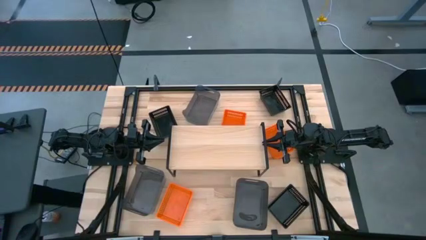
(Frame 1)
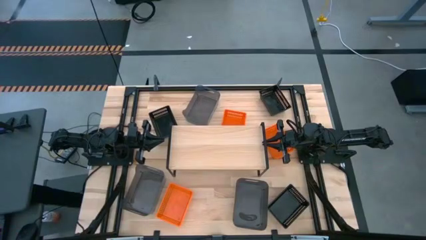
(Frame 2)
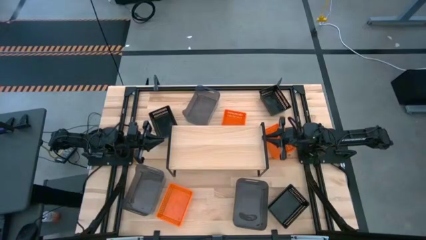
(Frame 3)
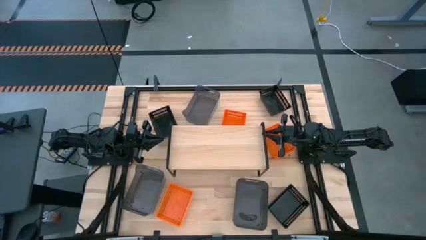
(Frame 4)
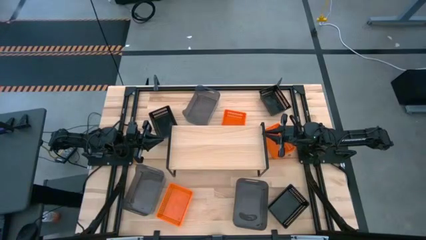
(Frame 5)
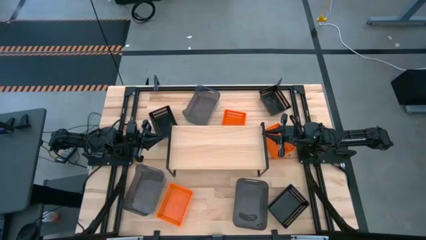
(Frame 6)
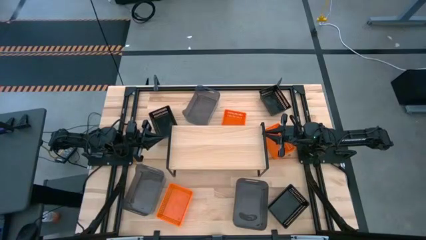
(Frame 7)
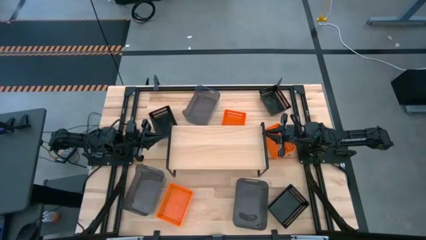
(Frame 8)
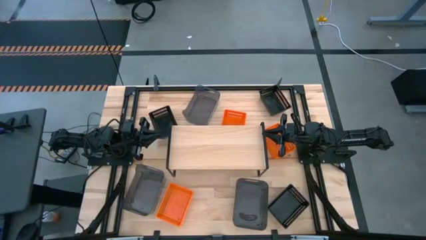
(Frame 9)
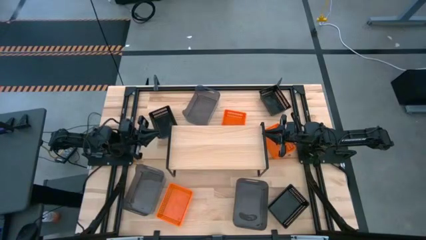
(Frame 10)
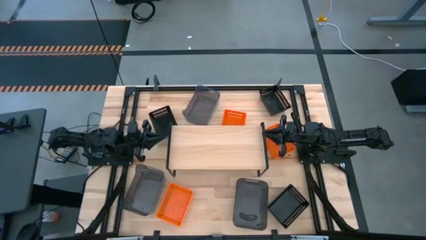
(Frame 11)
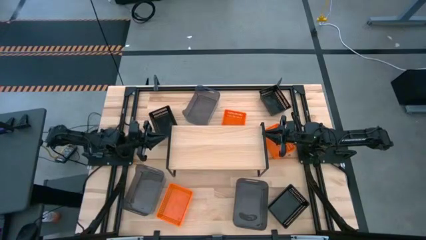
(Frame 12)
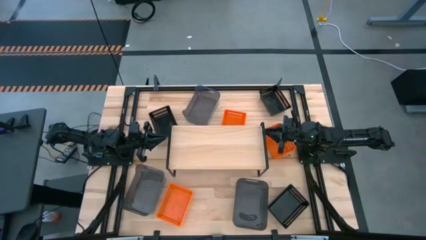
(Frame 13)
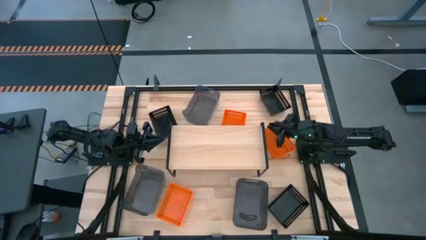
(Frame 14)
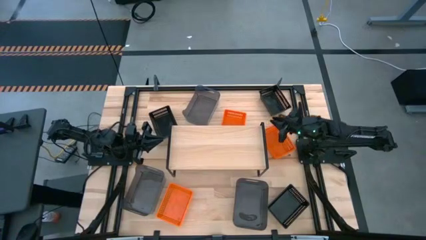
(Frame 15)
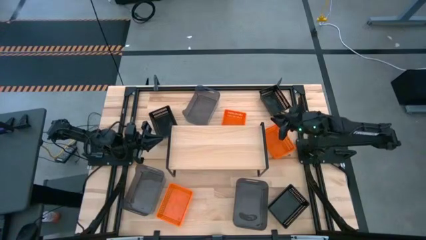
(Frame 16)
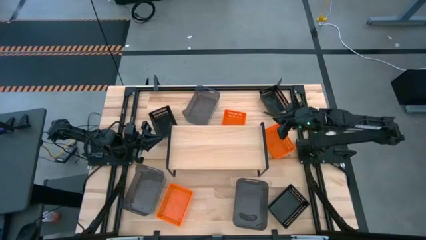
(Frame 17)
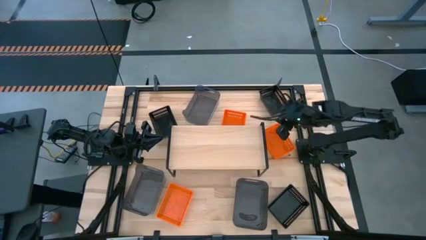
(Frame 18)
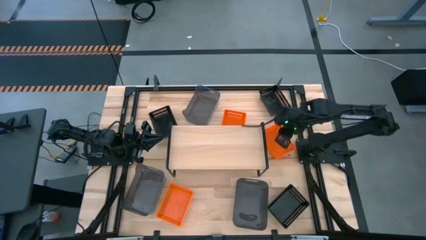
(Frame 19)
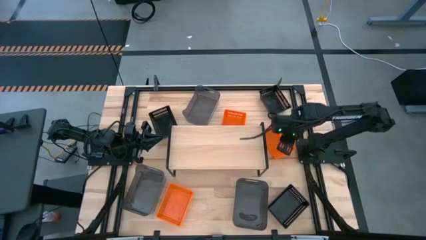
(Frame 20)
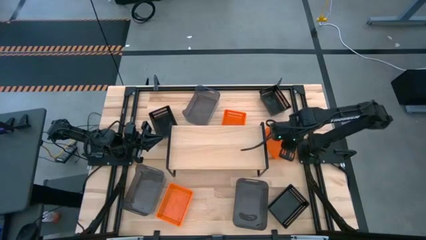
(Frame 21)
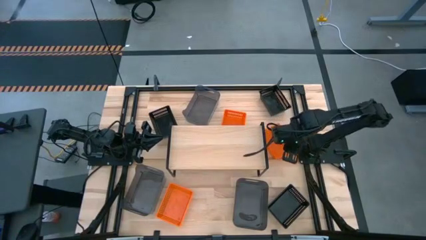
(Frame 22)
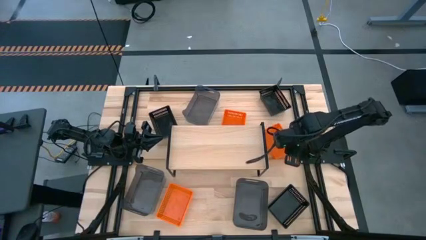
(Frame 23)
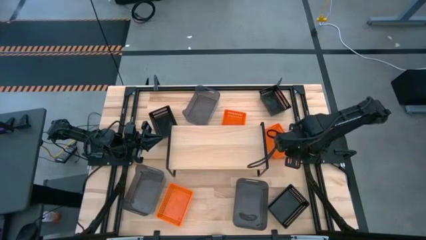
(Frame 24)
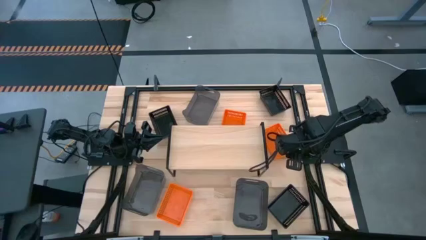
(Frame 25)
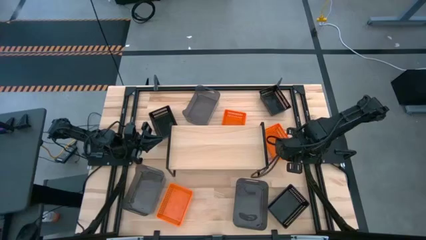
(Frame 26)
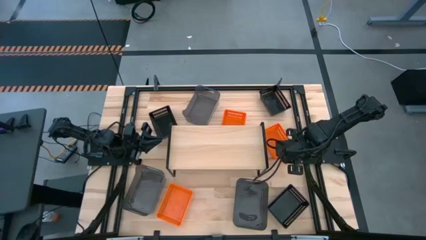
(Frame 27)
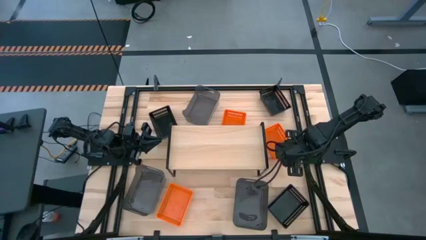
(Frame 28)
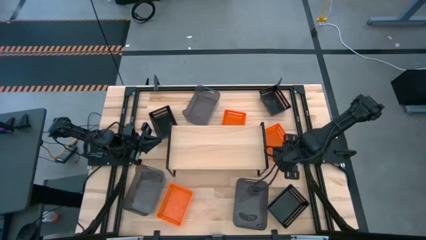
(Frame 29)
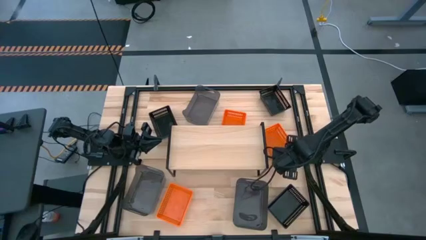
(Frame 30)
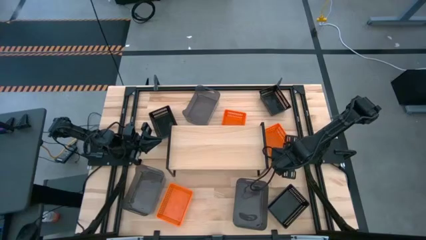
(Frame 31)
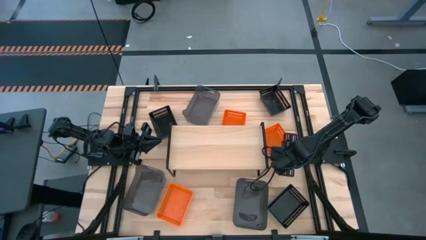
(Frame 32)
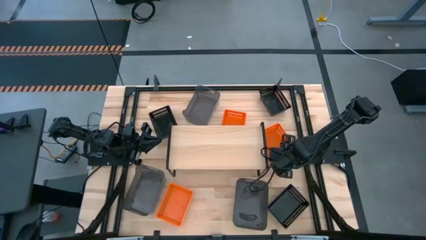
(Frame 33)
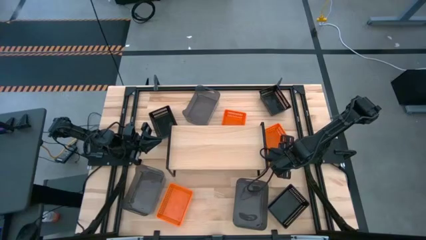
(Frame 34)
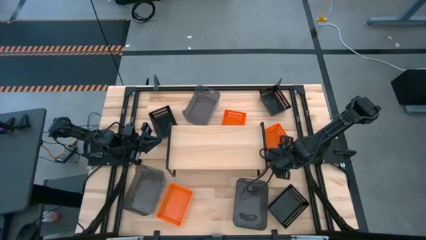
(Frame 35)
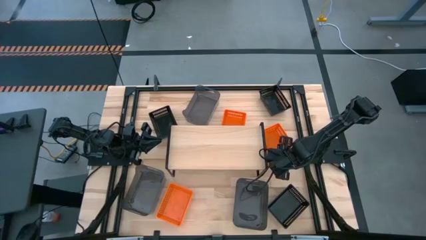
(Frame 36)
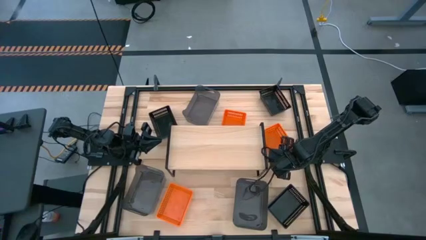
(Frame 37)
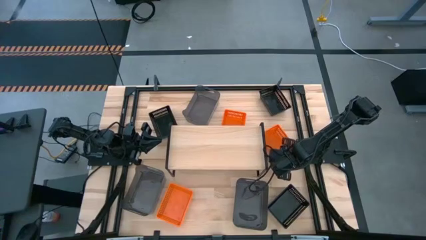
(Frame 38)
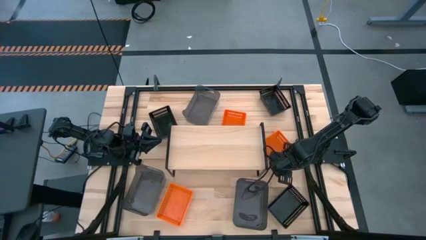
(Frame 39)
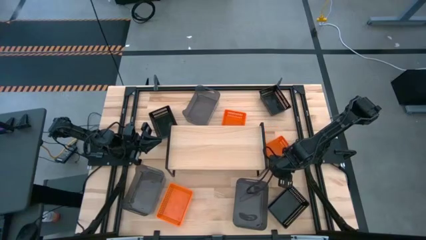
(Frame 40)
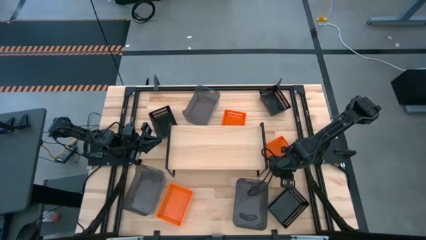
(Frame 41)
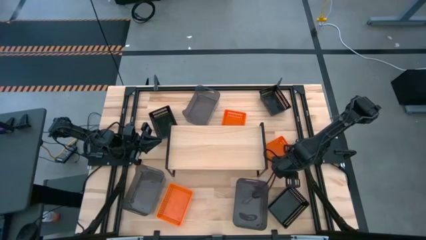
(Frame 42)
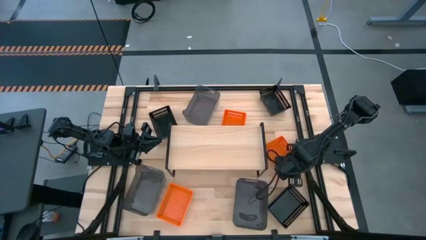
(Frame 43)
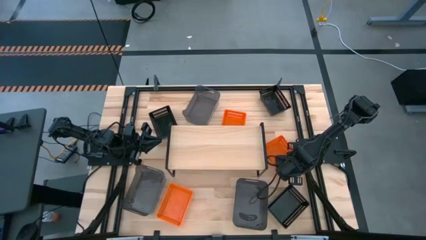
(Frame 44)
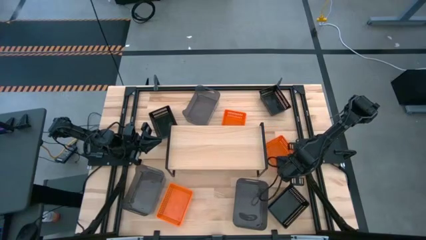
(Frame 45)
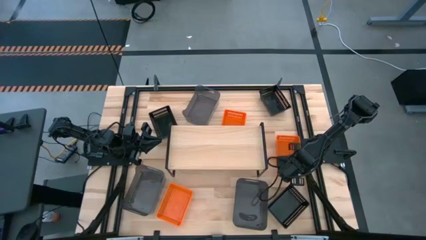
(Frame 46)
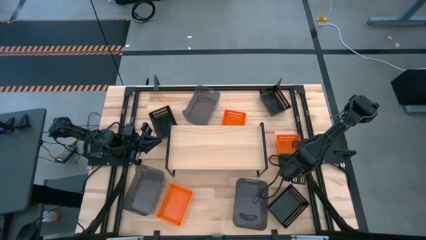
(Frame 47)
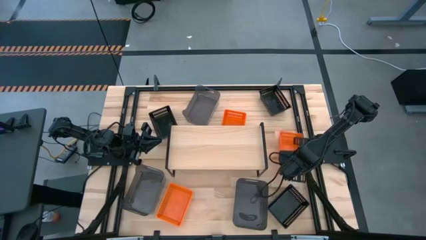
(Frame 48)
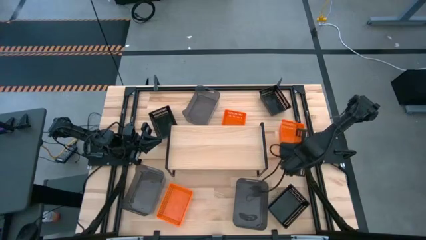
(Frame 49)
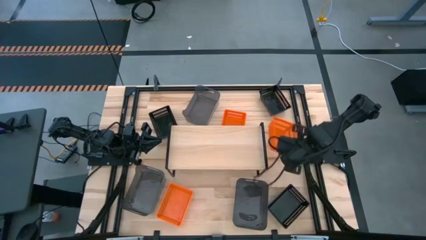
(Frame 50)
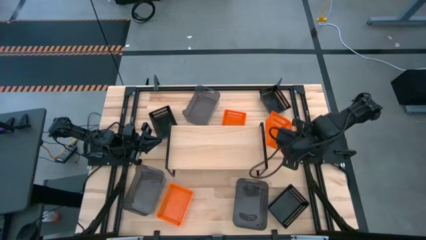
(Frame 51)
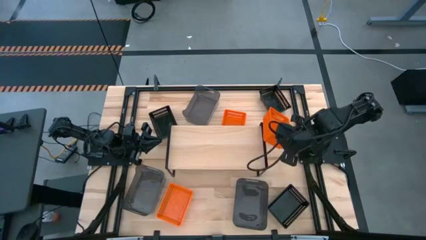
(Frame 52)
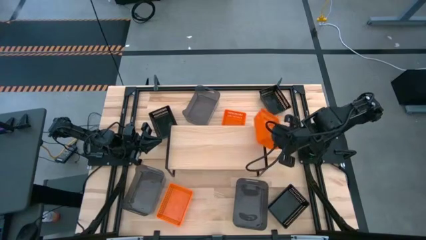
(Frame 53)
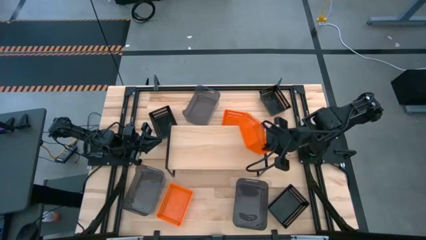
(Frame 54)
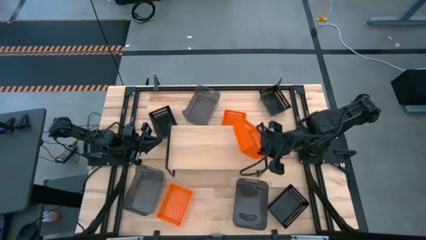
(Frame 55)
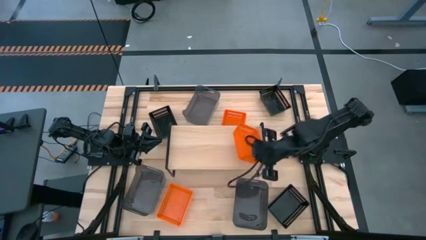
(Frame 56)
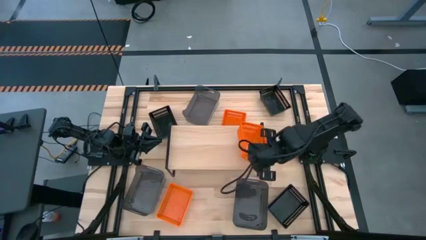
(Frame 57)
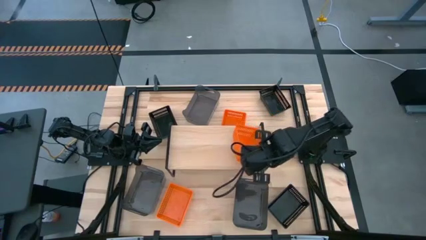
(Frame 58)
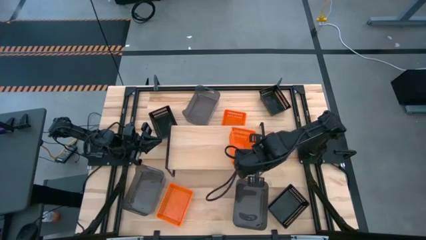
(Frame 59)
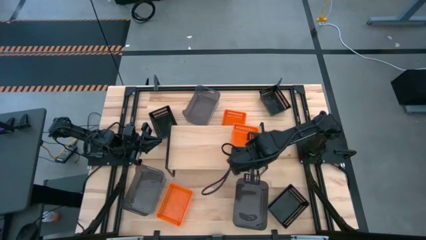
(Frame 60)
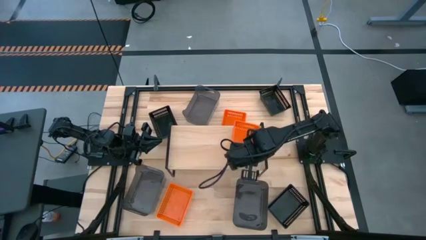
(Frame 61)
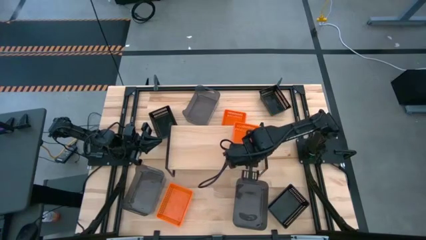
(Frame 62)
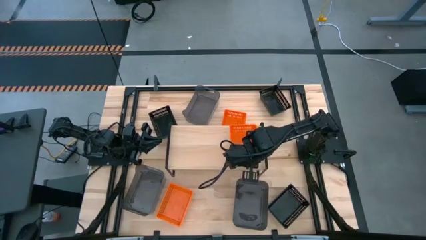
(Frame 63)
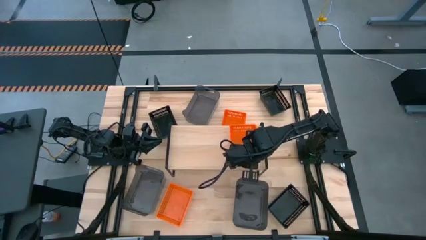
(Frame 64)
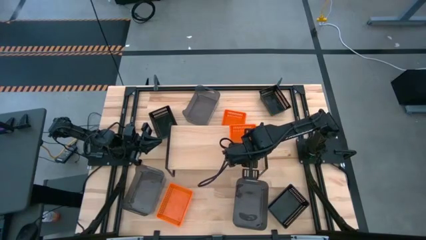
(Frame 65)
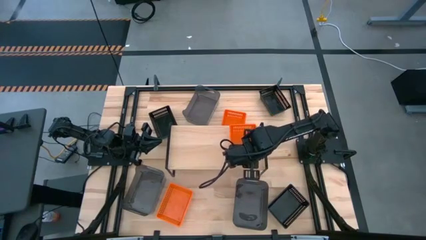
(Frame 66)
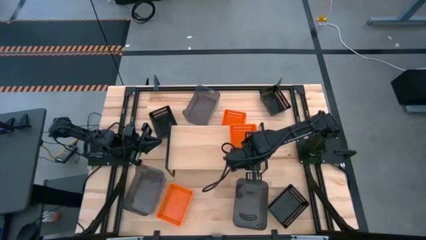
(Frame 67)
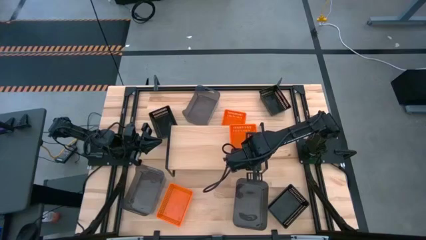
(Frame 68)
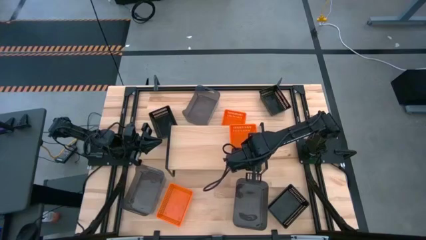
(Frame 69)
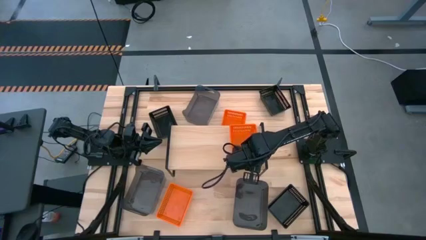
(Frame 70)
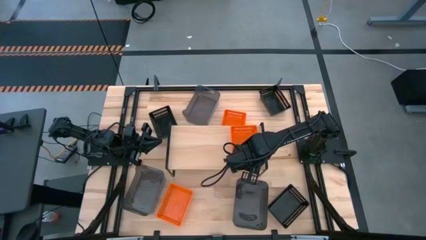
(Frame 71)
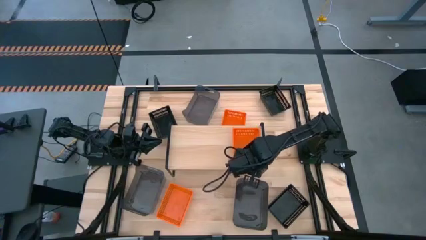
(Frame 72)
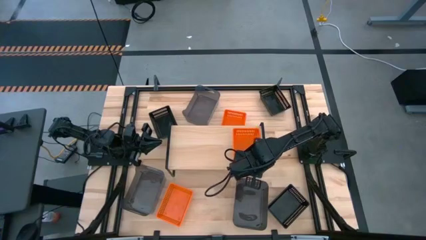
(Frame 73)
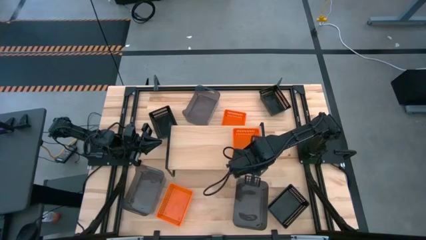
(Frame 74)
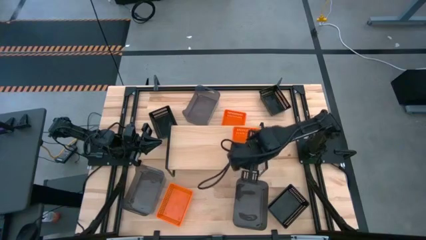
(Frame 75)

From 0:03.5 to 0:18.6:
Task: Stack baskets on shelf by color
Put the top right orange bin on the shelf
